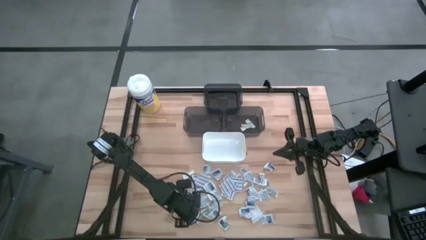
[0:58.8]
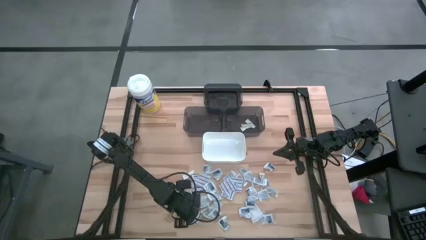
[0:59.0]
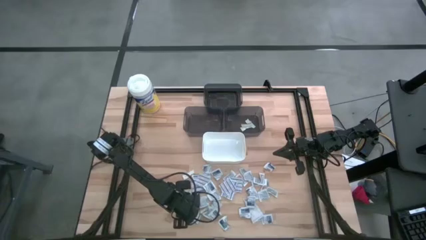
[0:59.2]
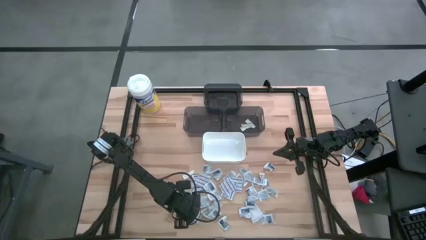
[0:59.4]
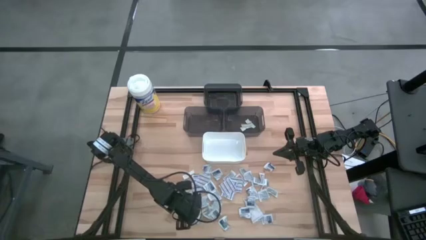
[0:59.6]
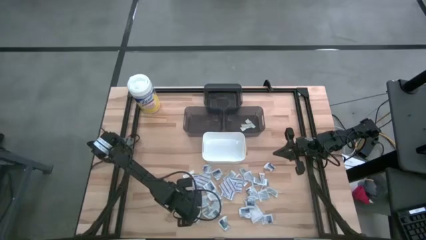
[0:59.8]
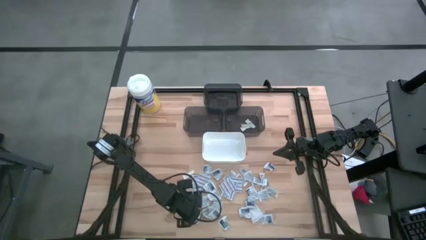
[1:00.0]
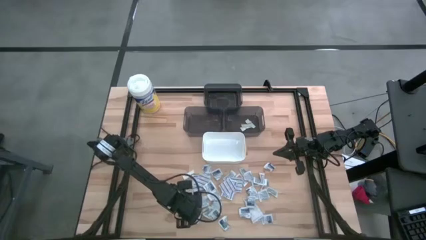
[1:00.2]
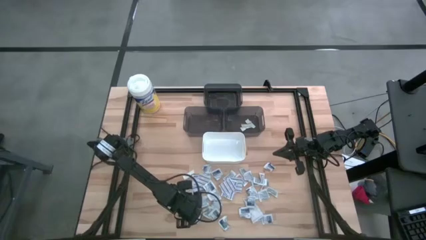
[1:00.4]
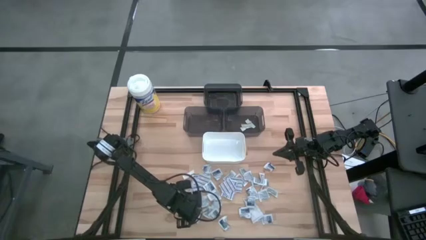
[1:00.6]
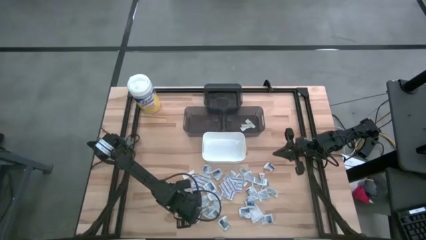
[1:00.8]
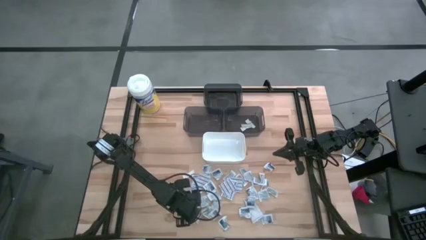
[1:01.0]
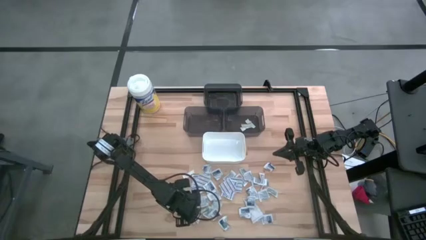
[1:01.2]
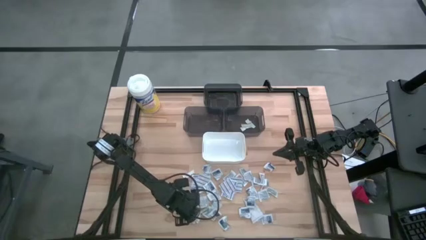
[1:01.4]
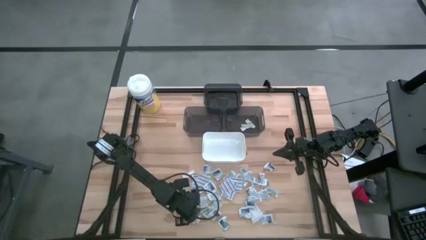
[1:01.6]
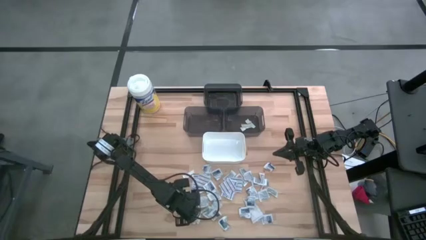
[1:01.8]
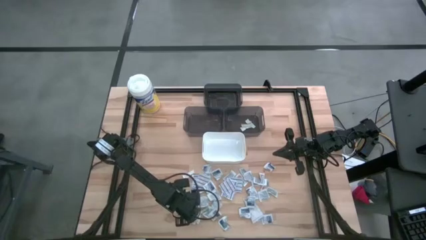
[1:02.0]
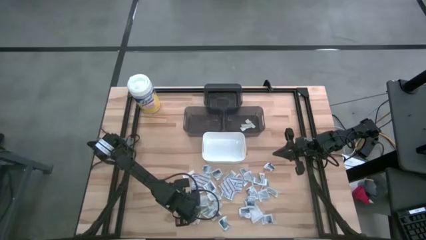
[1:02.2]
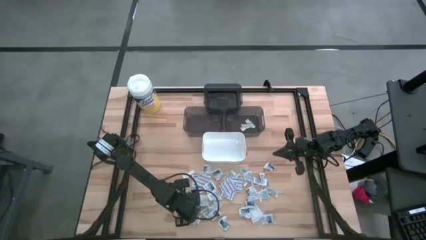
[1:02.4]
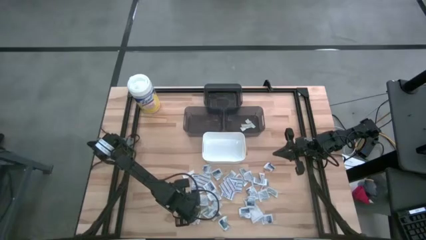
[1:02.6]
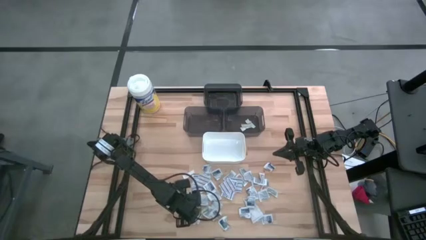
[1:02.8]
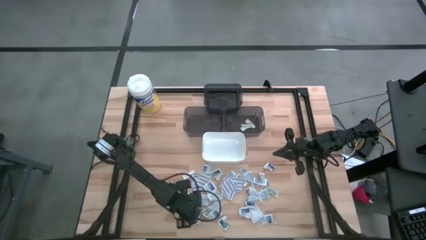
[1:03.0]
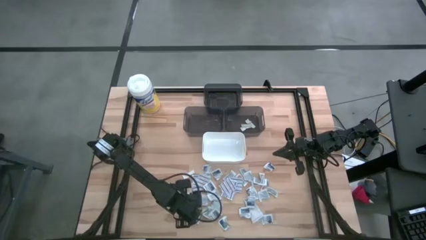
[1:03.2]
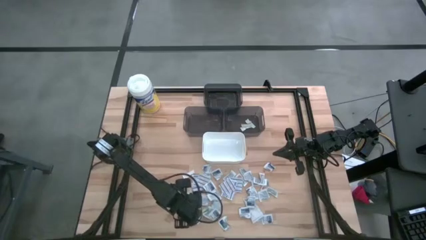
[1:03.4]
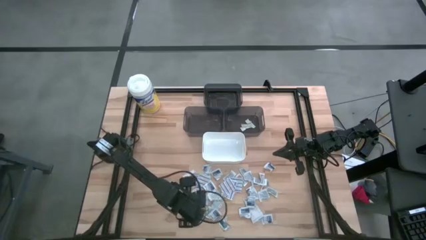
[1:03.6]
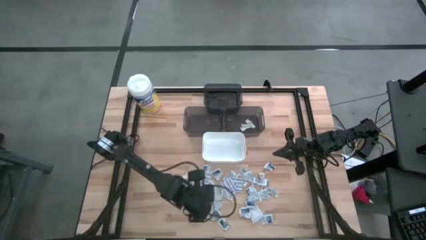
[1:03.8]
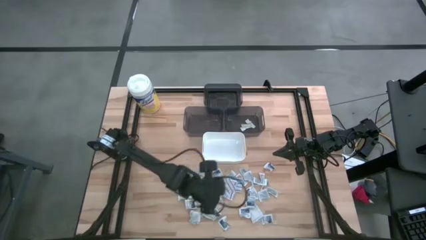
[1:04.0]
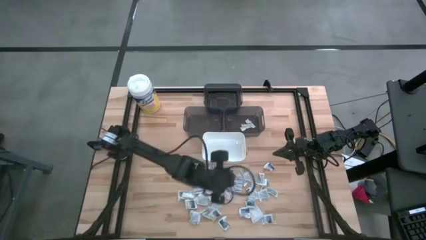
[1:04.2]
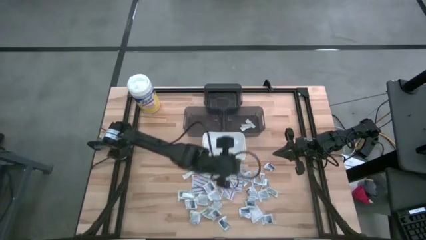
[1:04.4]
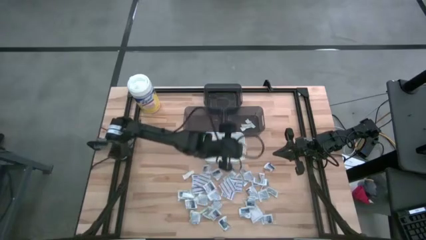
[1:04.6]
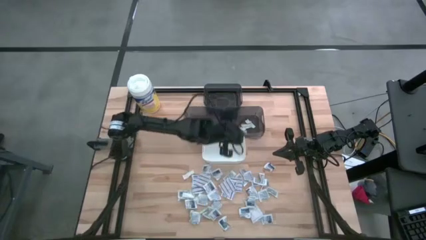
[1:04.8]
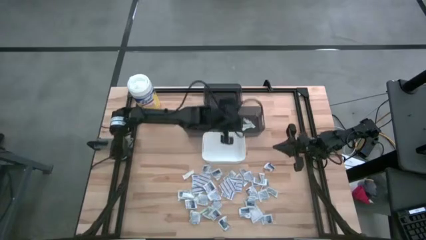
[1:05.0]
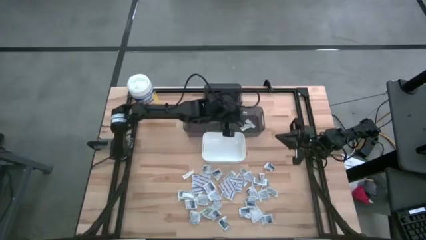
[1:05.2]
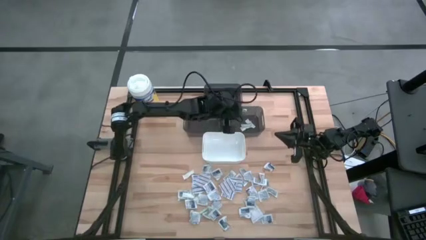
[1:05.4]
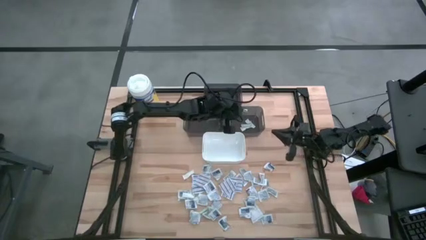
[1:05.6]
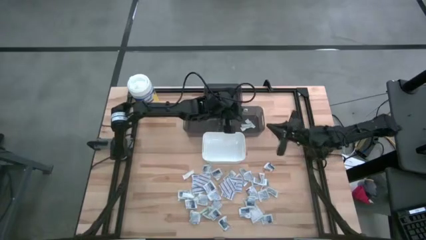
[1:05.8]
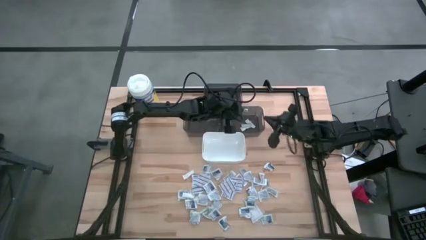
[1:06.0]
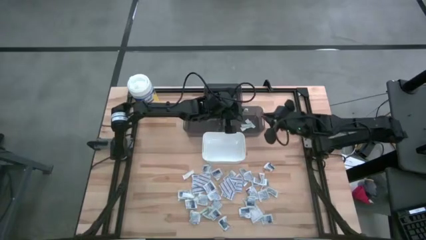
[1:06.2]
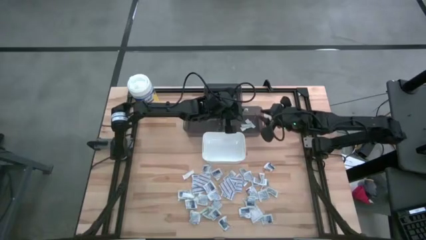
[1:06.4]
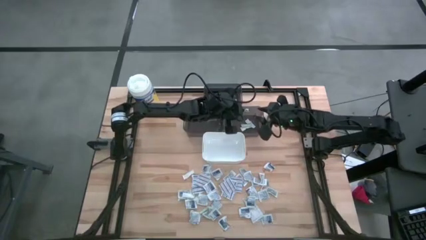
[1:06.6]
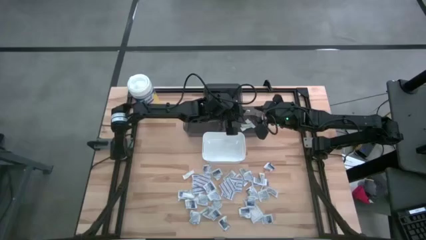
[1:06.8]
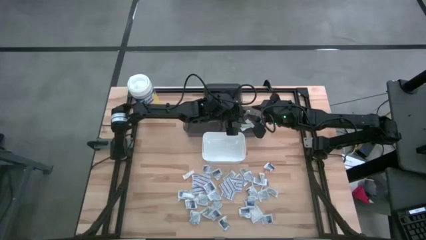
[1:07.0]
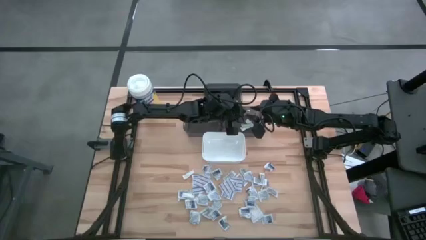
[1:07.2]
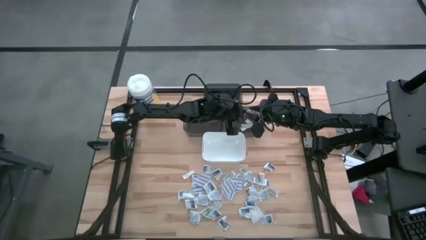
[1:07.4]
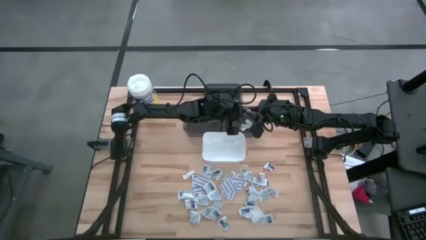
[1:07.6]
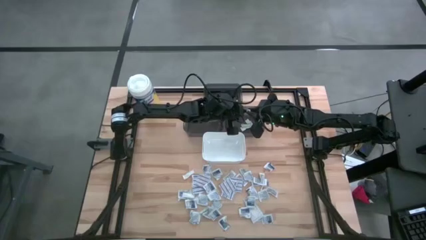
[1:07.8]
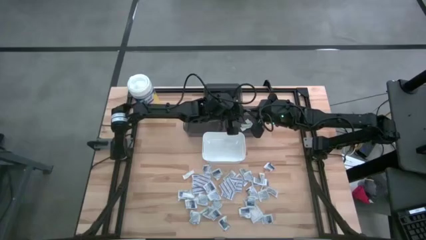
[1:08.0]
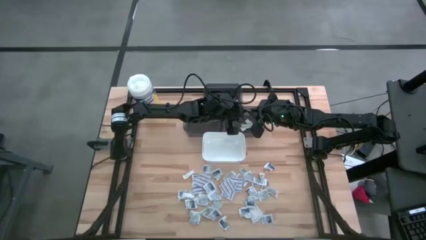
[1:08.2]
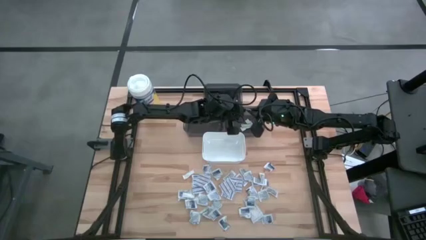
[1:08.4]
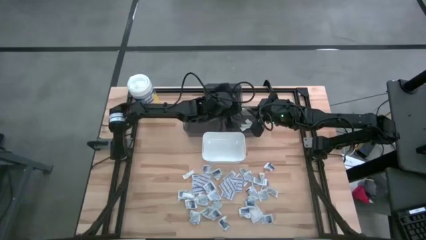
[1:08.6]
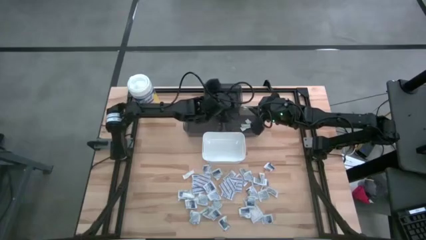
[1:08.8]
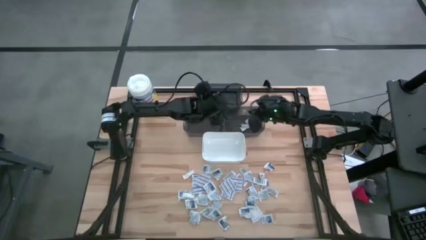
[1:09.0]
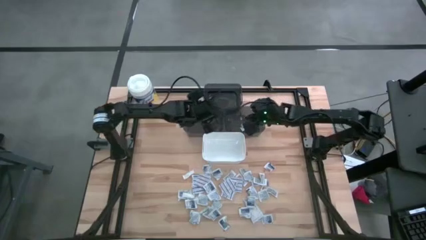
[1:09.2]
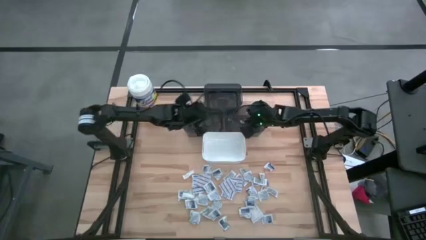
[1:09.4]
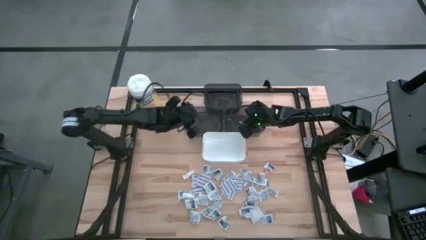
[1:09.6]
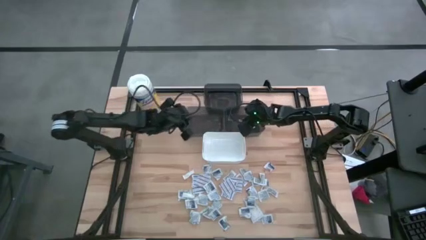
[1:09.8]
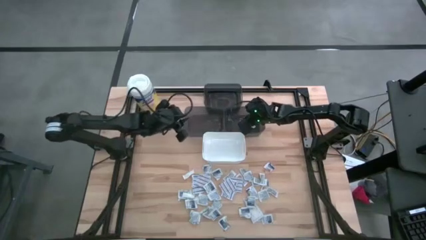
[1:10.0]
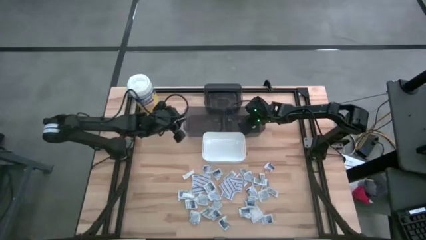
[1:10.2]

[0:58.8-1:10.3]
Task: Pick & Place First Aid Supplies
Put the green bandage into the bottom right black bin

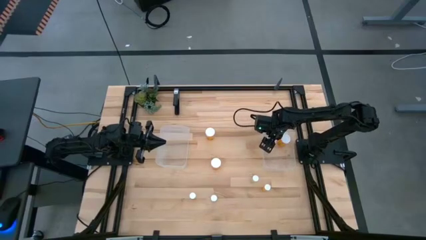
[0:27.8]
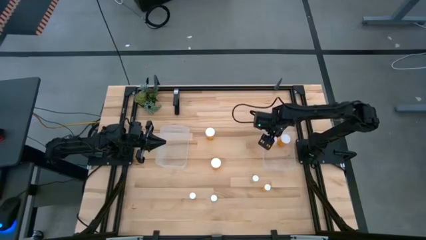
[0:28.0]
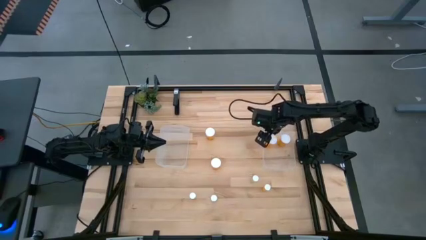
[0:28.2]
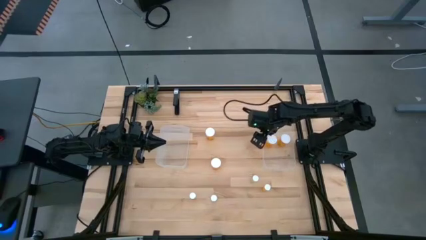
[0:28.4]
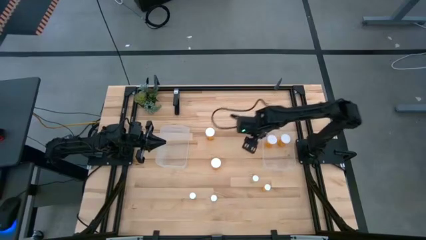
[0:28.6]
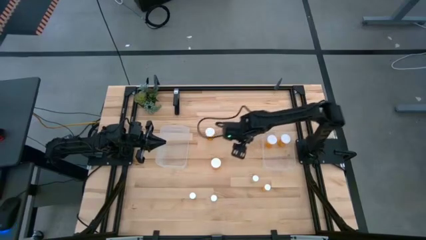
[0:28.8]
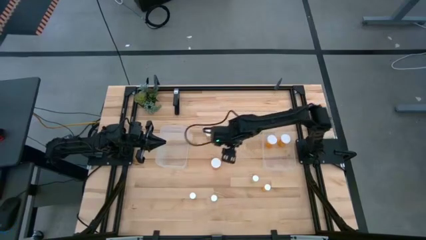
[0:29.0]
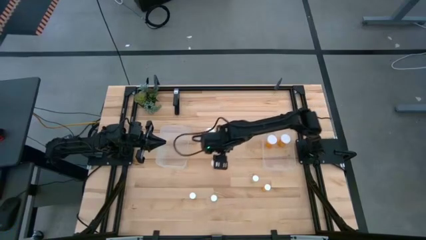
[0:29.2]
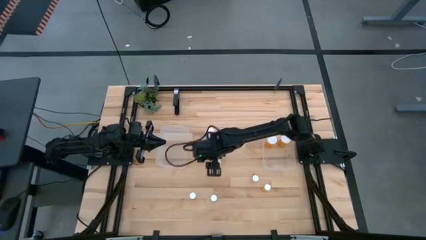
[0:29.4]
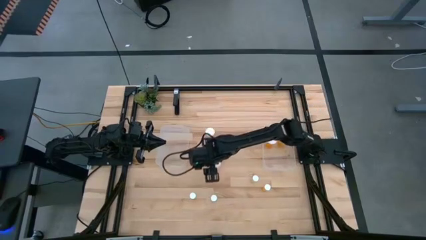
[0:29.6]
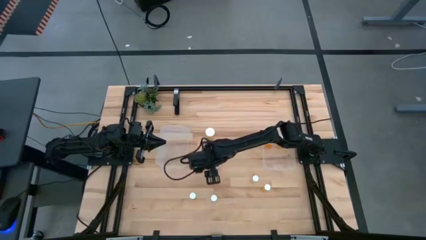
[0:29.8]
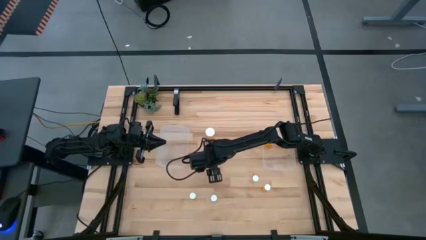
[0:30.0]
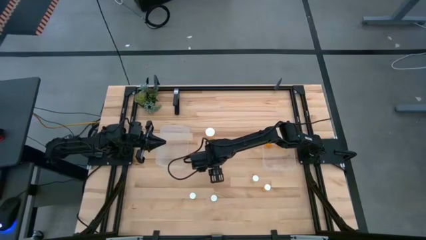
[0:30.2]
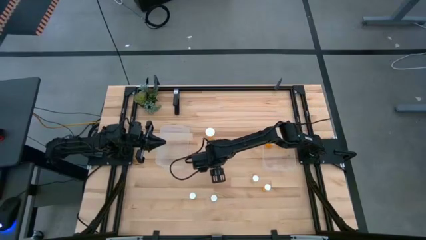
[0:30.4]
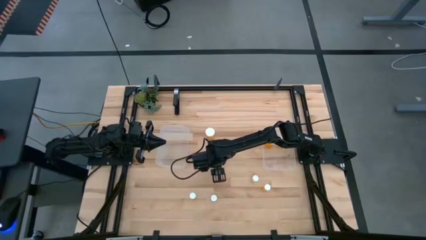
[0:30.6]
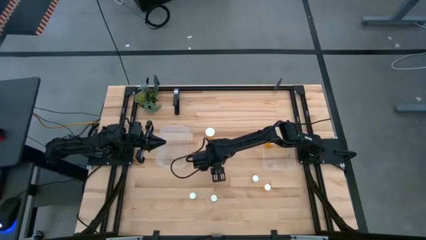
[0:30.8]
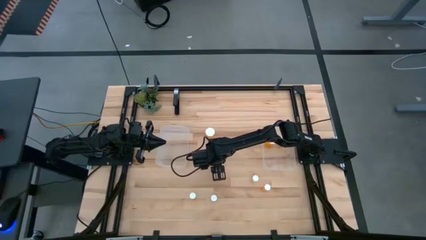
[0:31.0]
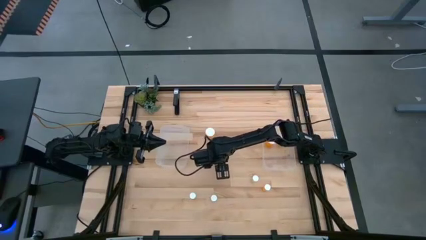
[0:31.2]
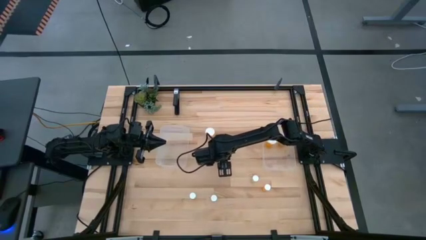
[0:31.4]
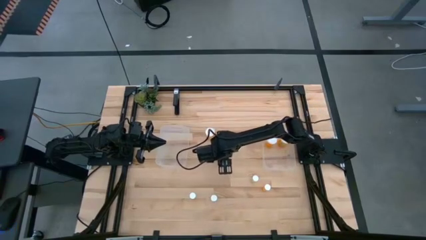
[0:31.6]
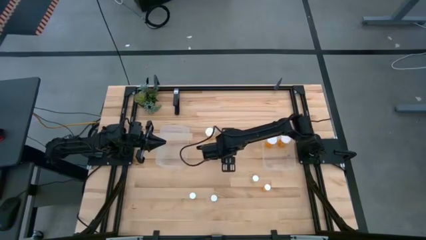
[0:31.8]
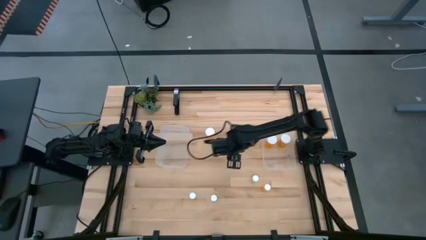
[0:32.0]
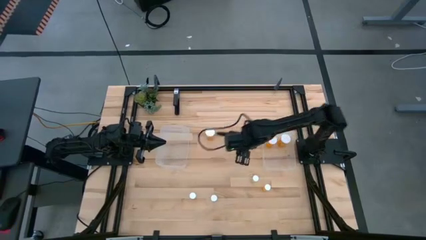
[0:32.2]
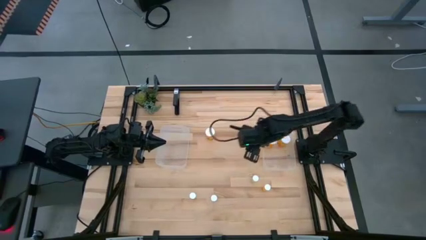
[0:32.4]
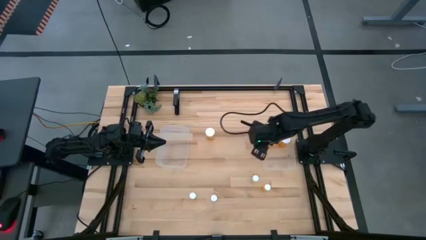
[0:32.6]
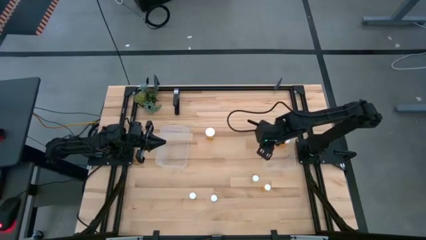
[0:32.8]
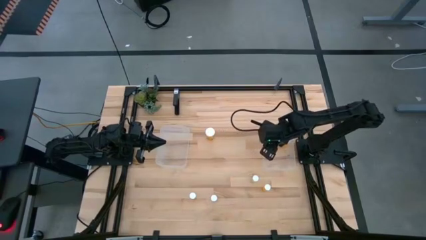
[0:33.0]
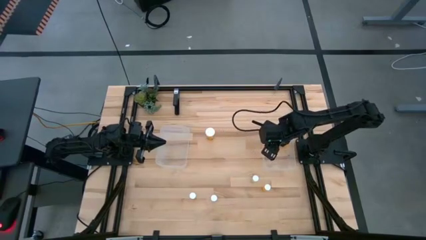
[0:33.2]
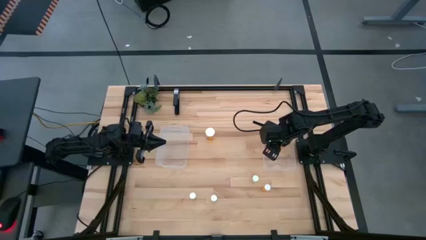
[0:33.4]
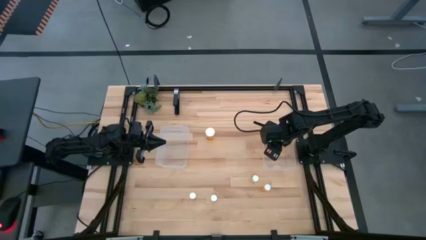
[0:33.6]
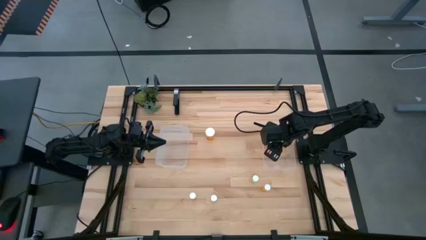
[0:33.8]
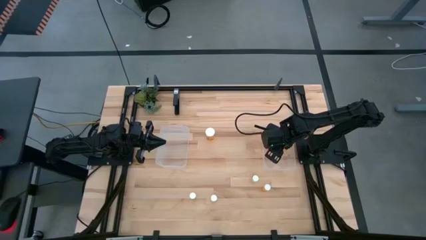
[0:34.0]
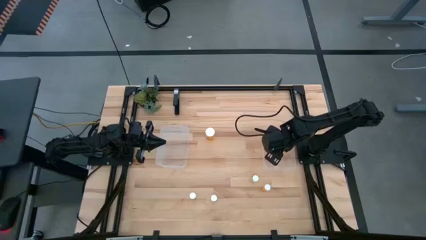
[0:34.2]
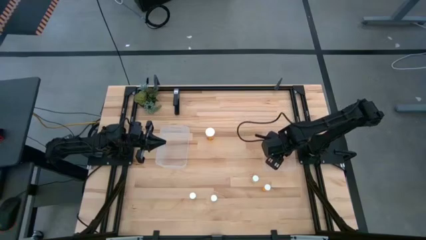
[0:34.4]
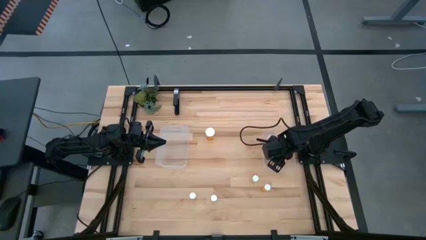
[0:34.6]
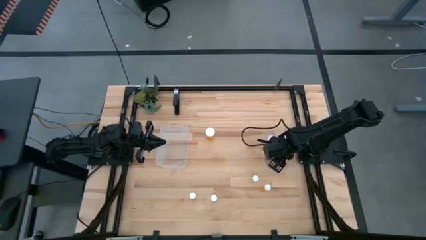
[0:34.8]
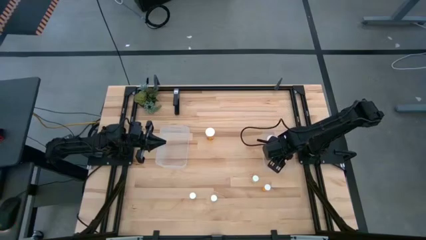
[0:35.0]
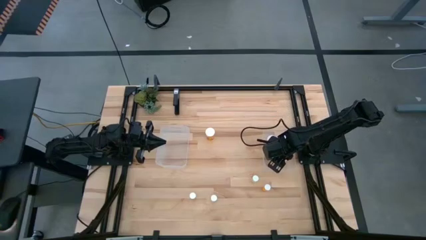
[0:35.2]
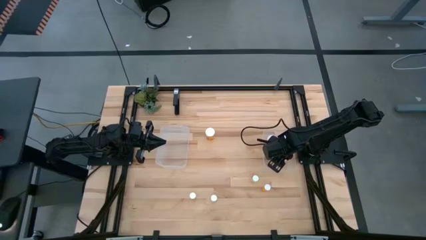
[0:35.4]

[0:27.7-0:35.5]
Task: Pick and place medicine bottles into bin by pill shape (circle, oval)
Put the bottom large orange pill bottle into the right transparent bin
